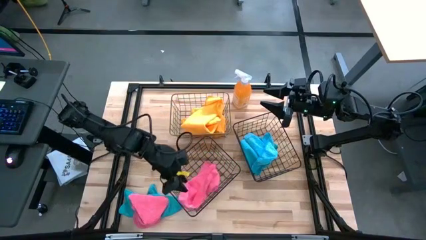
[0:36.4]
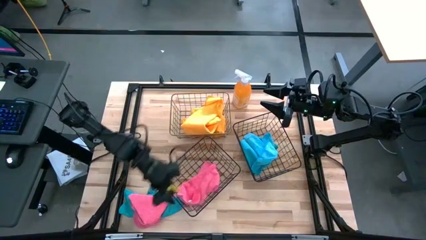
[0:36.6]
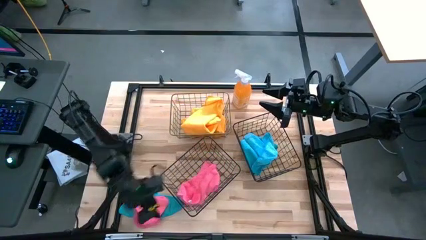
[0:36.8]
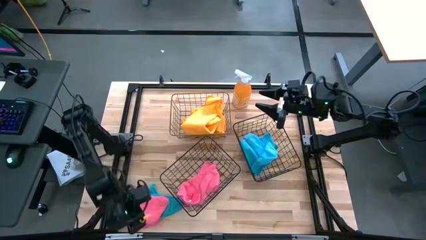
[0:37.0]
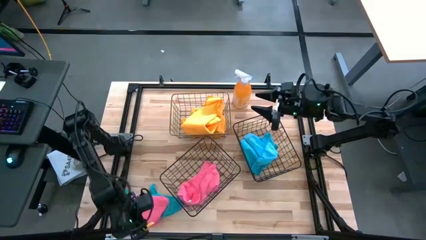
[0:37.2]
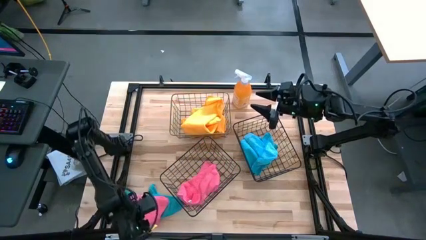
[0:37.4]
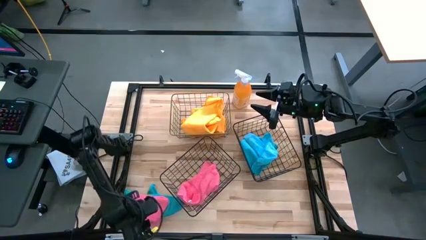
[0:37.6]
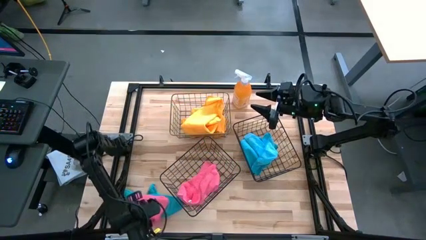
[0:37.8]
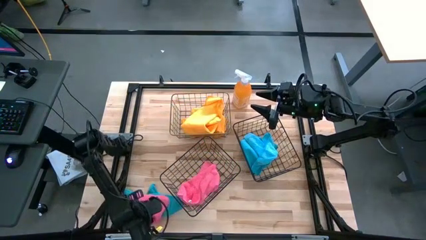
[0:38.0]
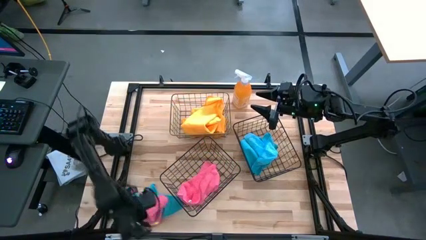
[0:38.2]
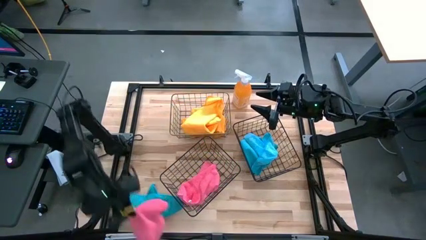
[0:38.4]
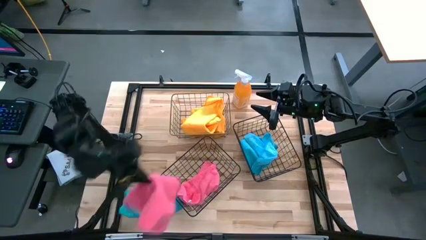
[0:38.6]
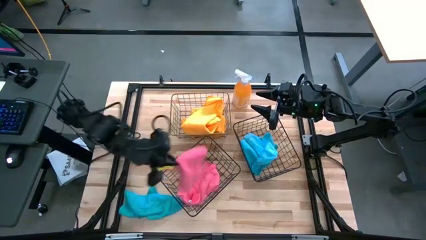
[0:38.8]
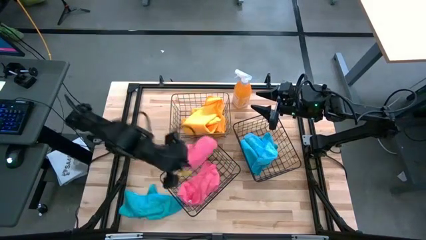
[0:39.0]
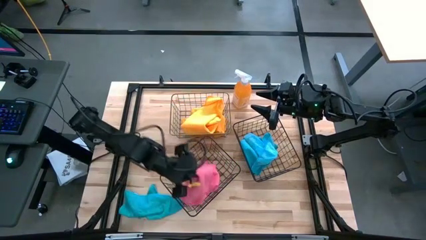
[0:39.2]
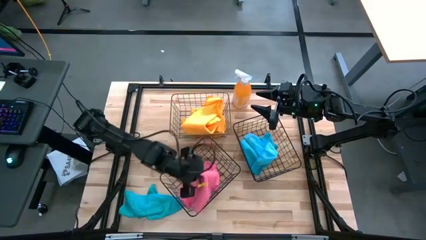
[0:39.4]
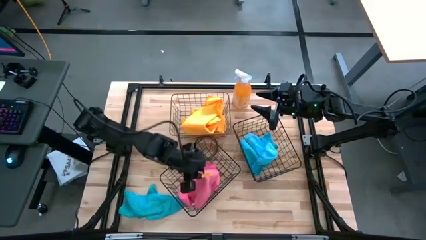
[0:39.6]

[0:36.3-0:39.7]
Task: Sort microfiber towel by color & place in baskets
Put the pink microfiber cloth into the left black basket

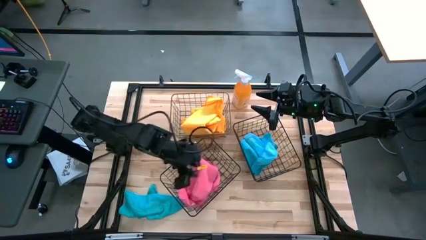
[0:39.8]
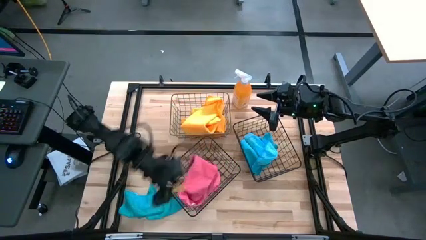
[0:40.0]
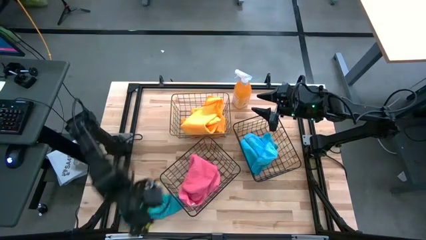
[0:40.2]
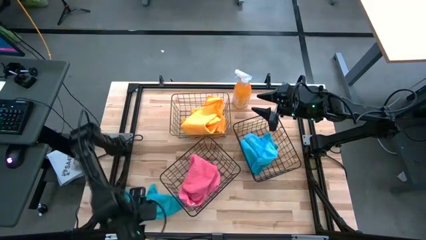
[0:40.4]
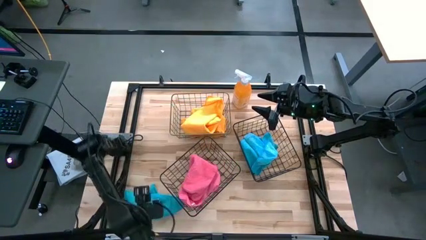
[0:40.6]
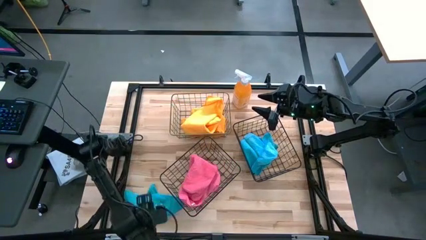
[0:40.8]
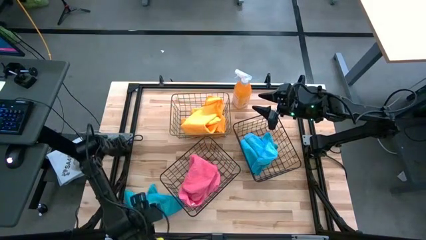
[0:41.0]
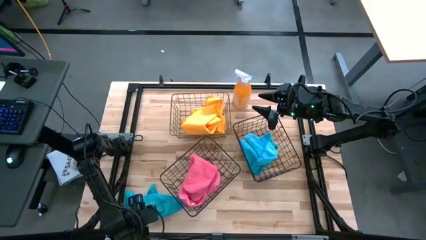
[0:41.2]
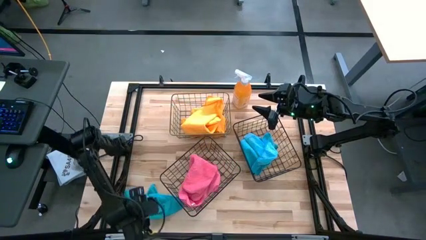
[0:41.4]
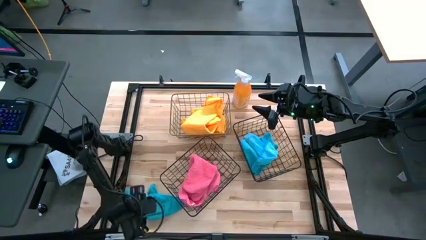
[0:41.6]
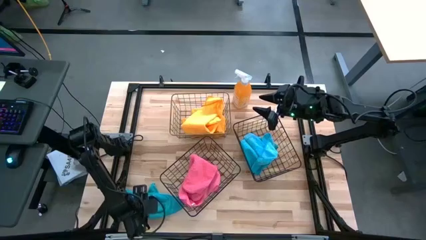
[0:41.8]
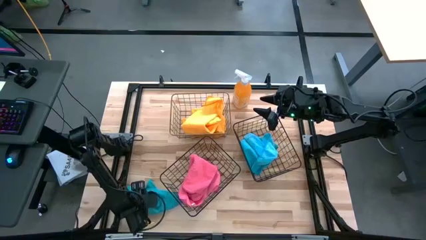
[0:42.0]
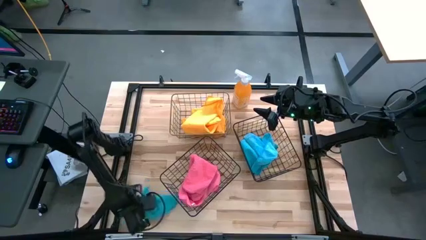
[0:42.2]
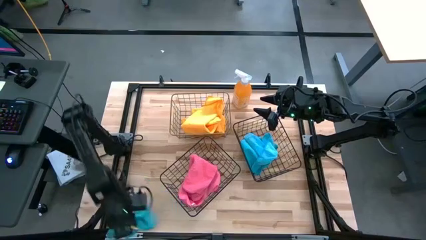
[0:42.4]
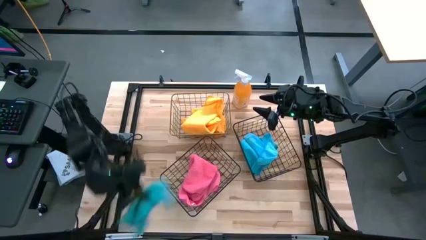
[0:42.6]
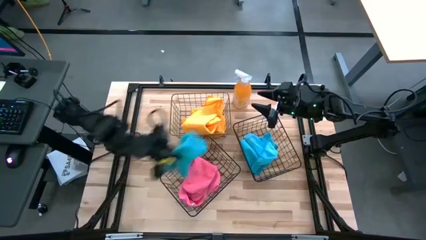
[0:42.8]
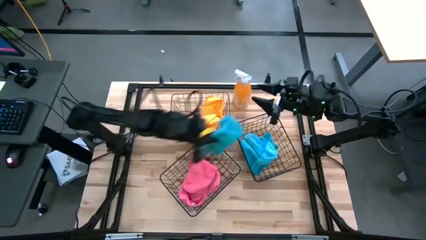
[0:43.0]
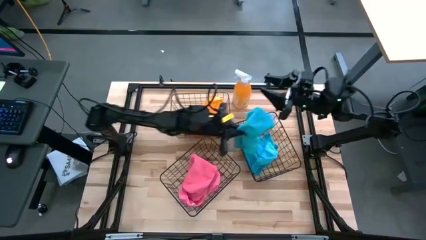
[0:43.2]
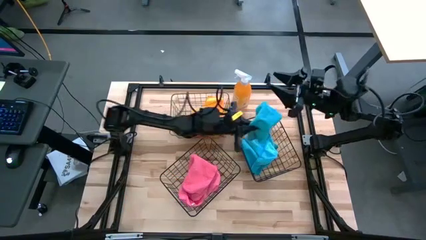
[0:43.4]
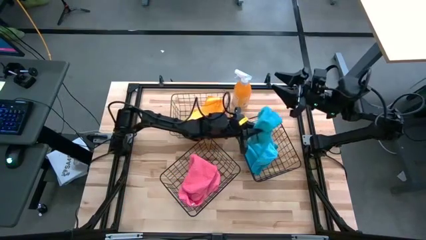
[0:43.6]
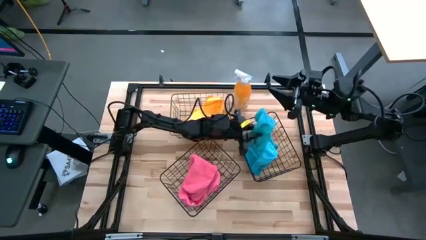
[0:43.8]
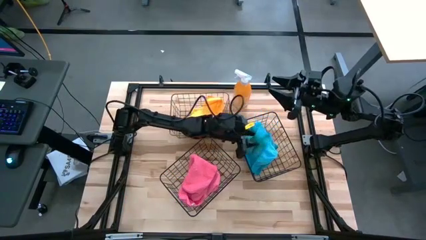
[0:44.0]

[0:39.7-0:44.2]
Put the blue microfiber cloth into the right black basket

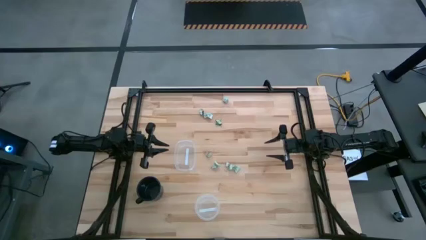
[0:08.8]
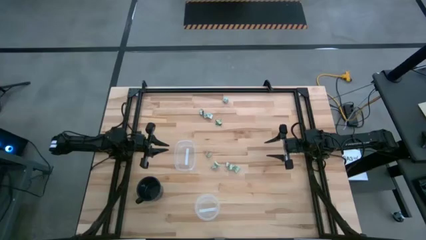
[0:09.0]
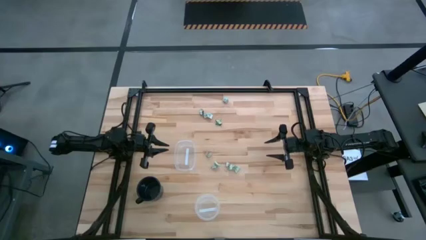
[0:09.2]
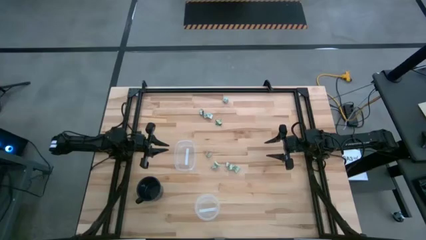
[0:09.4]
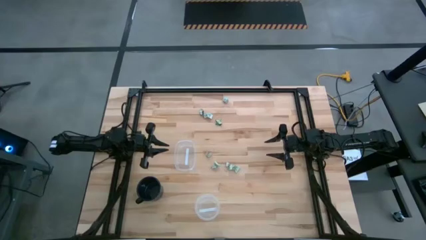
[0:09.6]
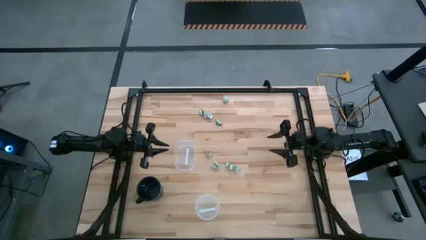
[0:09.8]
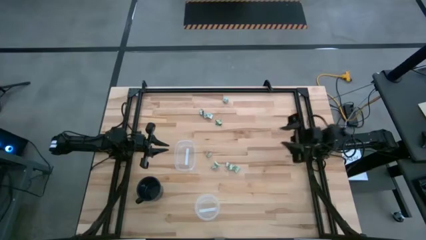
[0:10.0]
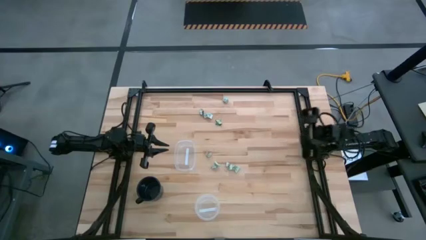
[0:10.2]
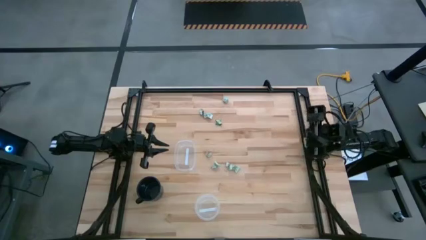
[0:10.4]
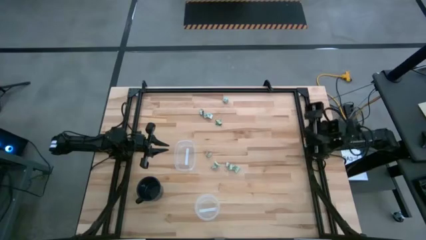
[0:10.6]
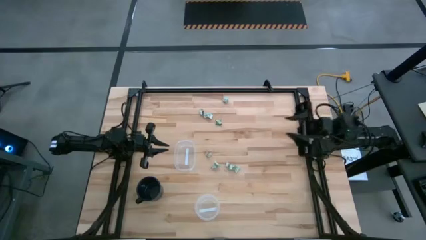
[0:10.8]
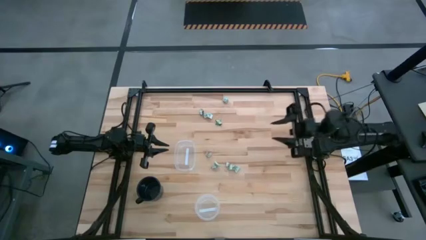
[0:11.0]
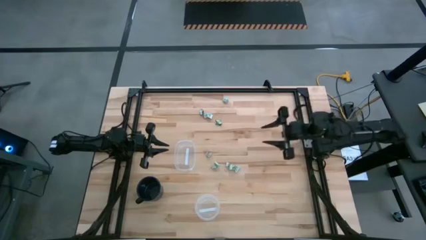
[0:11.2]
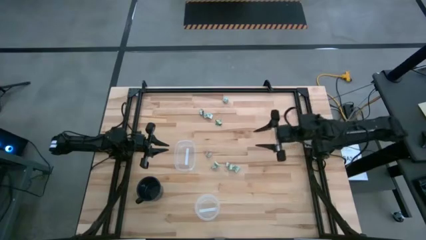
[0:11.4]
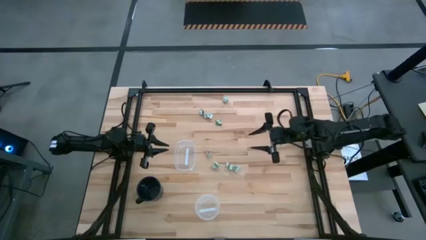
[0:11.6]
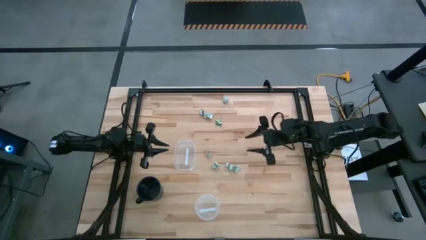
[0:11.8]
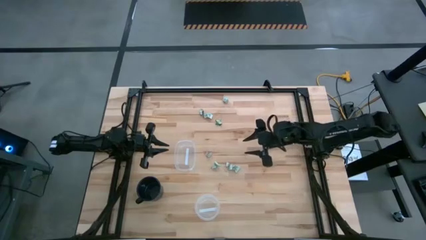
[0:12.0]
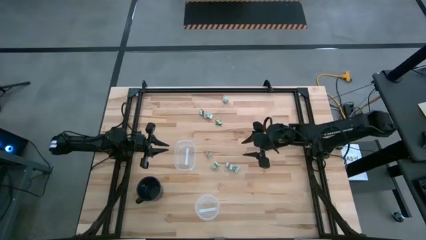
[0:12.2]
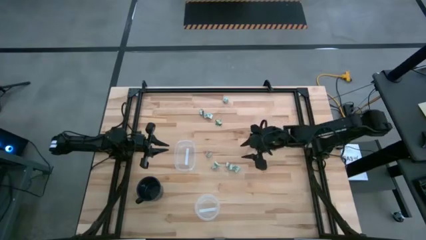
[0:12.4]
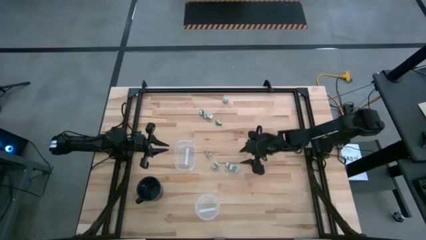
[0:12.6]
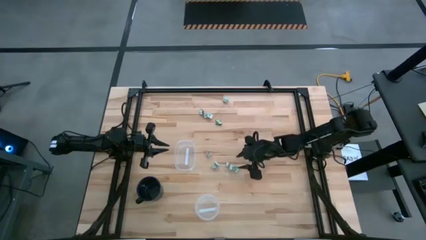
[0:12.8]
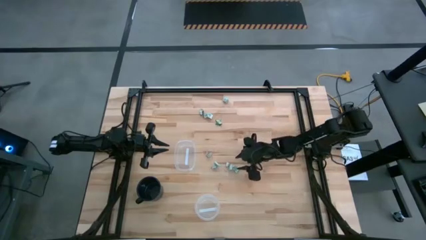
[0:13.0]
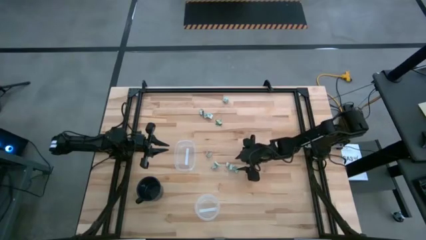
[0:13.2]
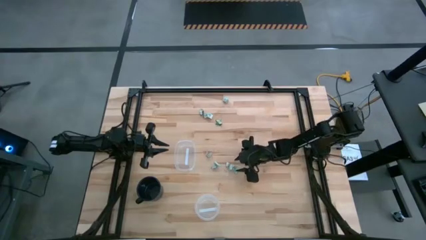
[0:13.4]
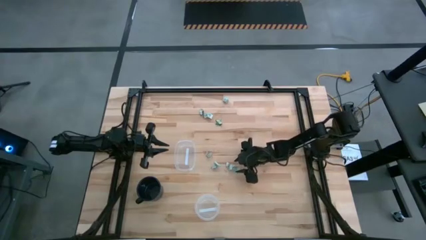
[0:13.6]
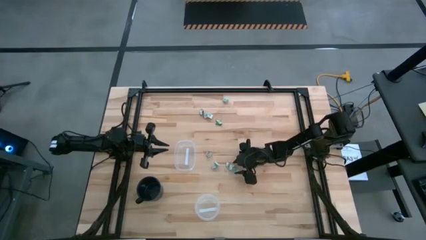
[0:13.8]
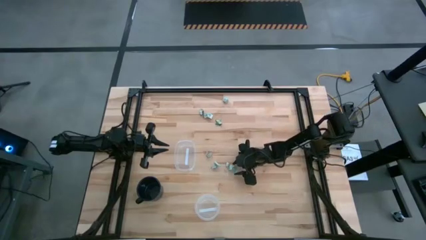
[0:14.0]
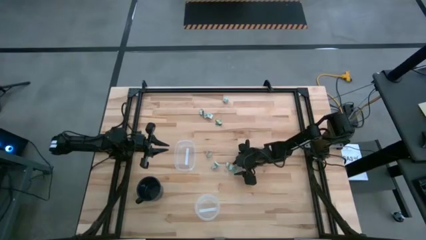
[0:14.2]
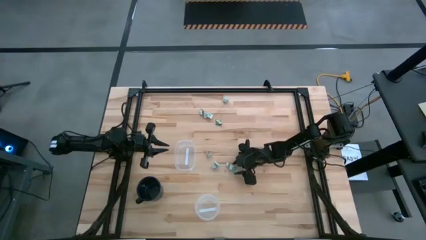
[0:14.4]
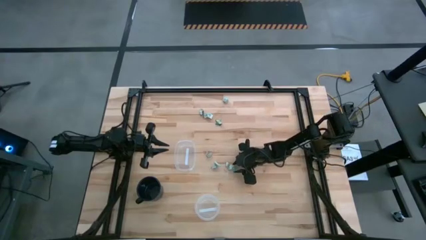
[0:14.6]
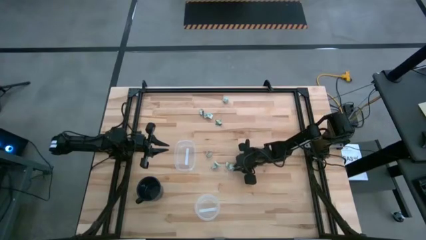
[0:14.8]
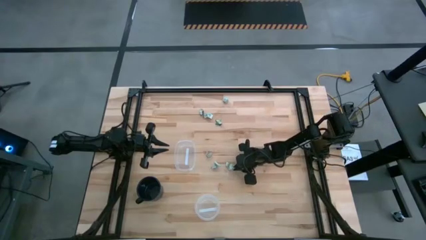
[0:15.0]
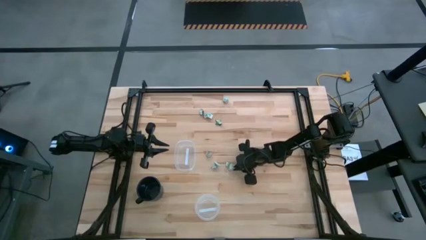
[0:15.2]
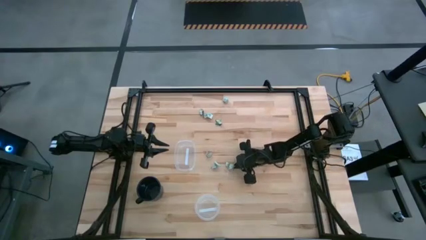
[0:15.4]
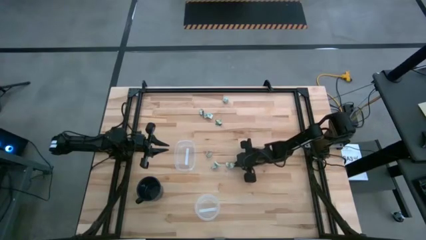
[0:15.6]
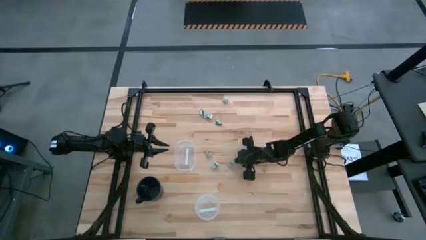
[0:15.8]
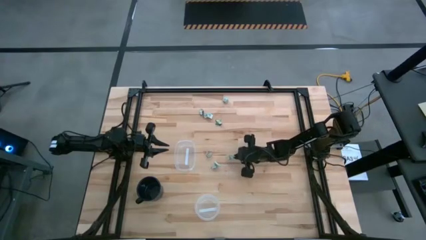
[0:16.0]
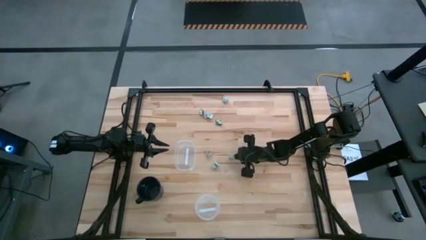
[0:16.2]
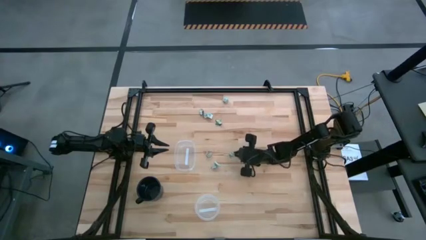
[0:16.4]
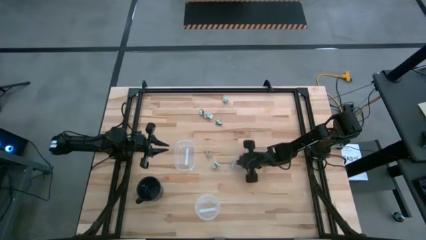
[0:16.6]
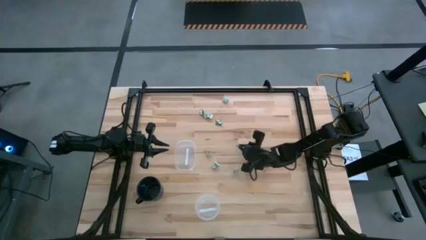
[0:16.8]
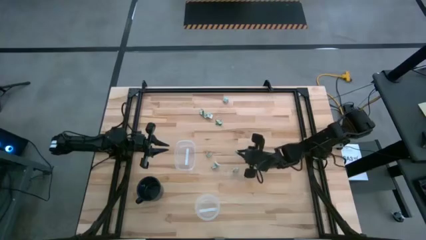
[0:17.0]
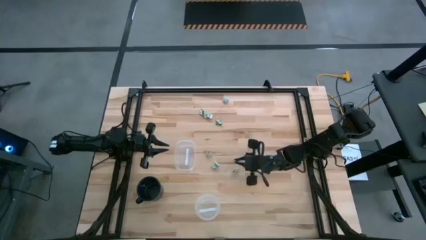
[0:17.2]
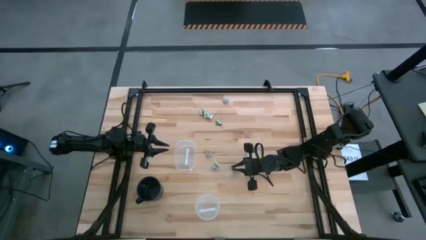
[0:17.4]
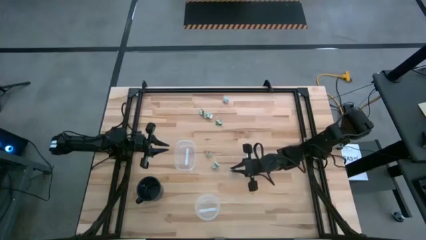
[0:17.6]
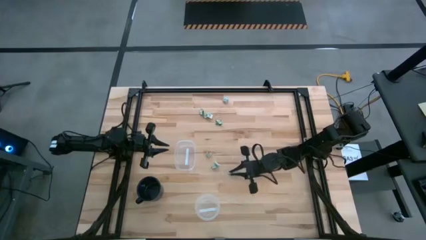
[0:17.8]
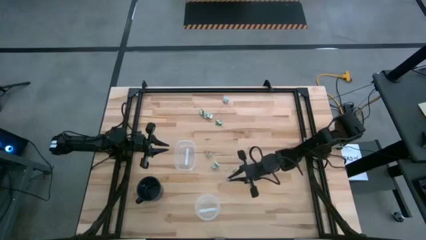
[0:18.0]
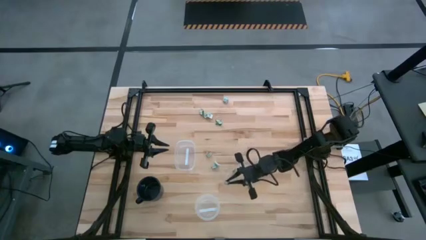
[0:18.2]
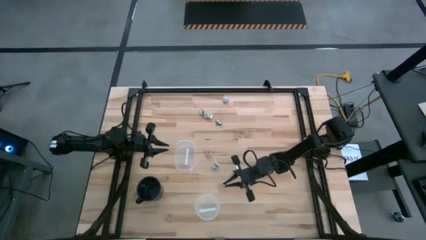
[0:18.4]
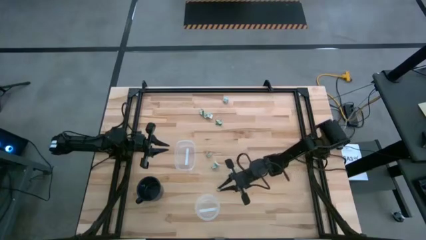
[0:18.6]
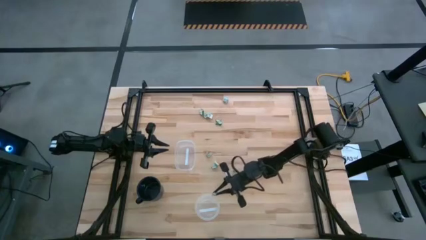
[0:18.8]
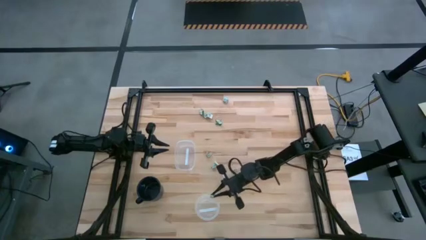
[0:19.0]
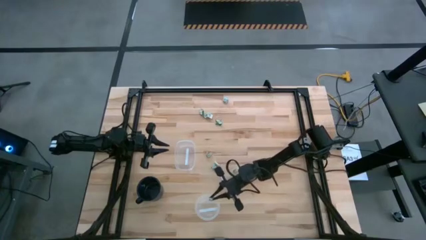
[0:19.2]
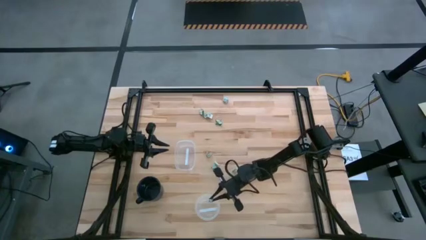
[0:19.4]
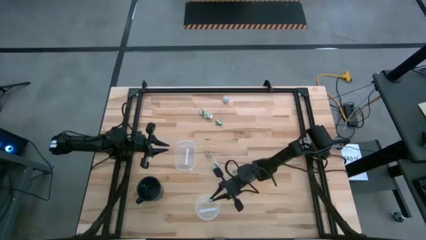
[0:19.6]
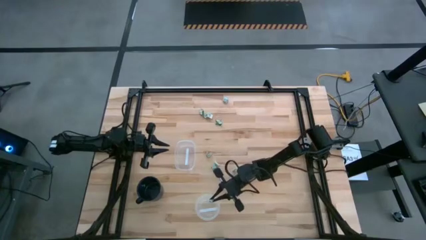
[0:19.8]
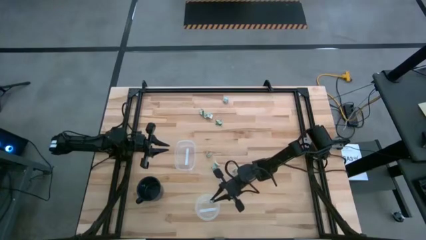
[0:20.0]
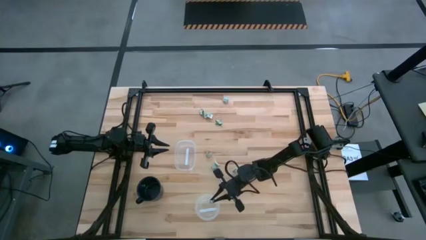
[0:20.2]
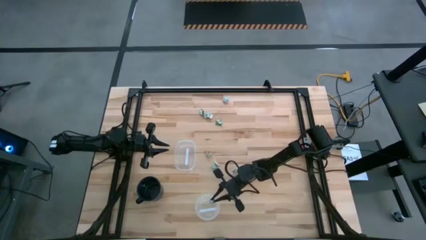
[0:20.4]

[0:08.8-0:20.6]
Task: Pick and place Stevia / Truvia into bins
Put the stevia packet into the round transparent container
